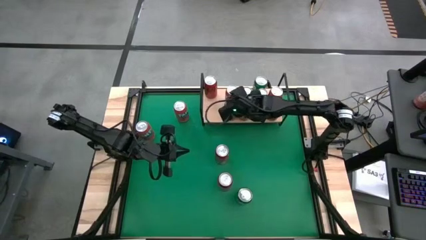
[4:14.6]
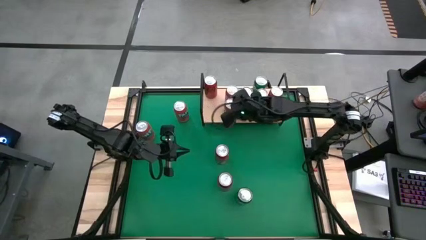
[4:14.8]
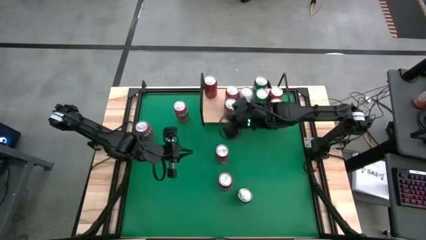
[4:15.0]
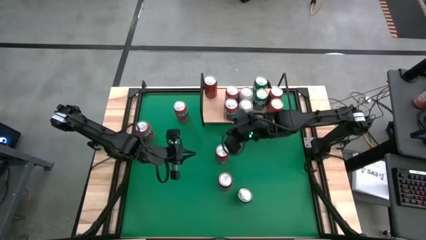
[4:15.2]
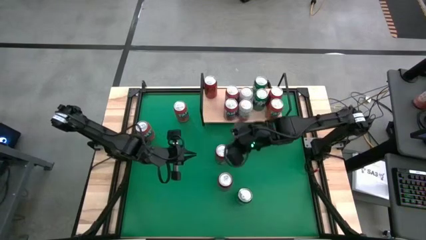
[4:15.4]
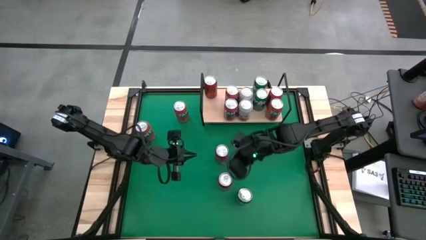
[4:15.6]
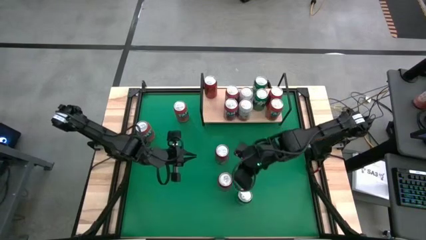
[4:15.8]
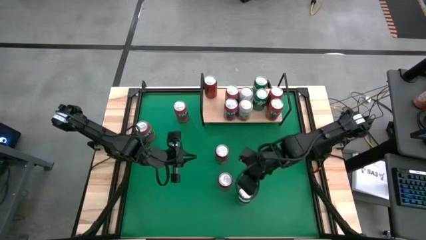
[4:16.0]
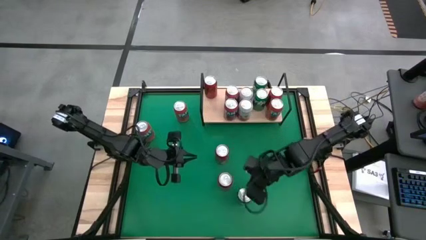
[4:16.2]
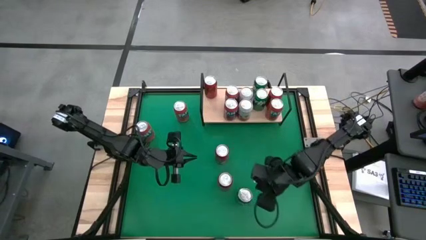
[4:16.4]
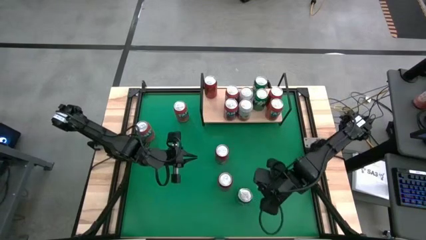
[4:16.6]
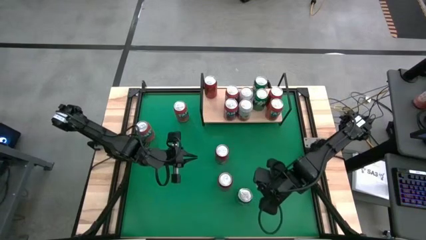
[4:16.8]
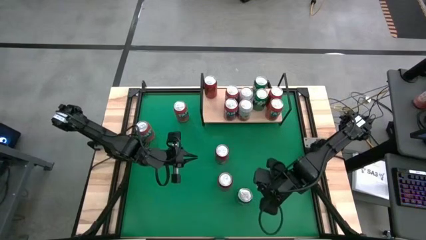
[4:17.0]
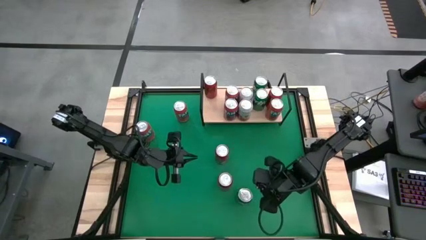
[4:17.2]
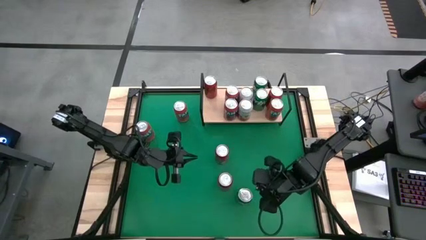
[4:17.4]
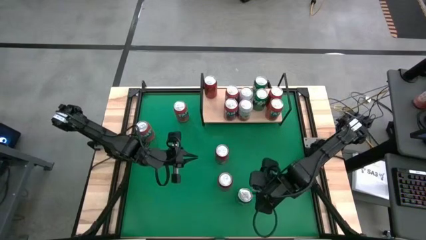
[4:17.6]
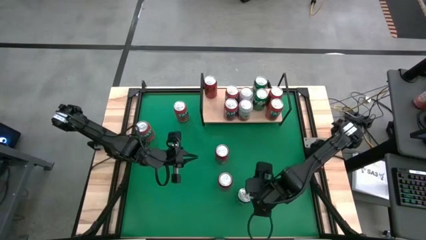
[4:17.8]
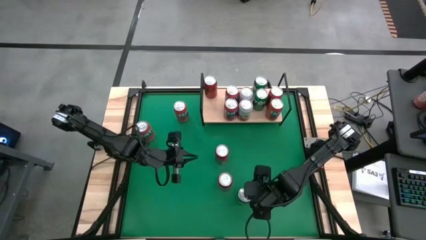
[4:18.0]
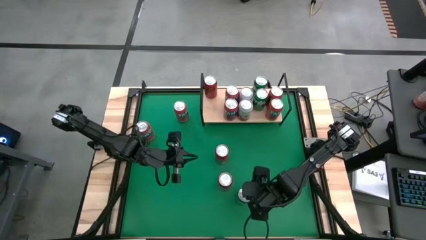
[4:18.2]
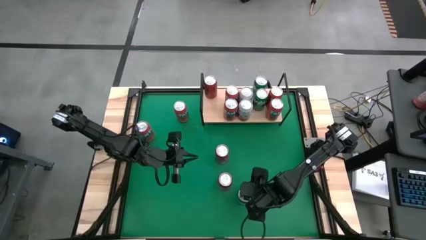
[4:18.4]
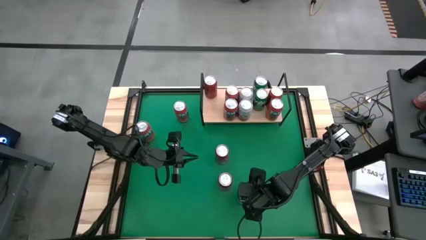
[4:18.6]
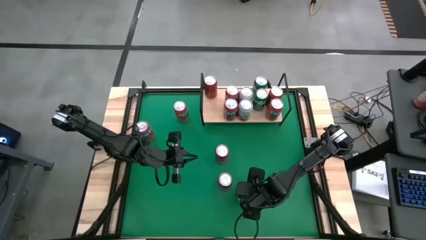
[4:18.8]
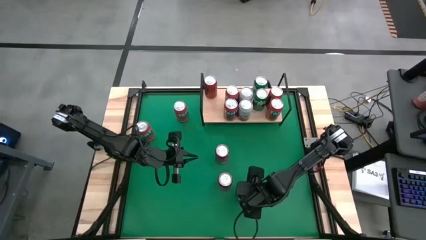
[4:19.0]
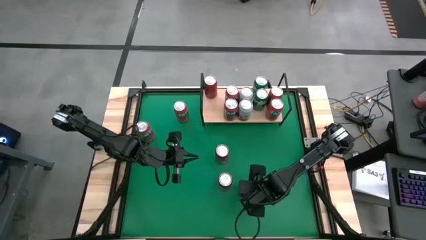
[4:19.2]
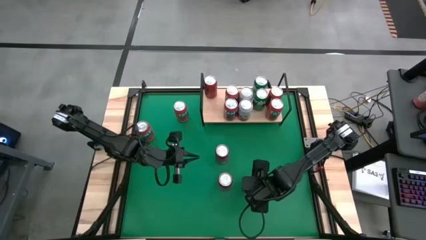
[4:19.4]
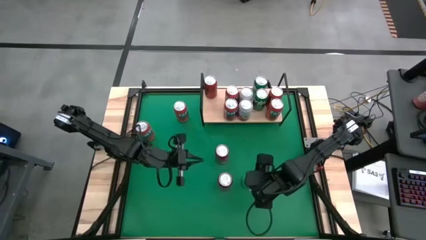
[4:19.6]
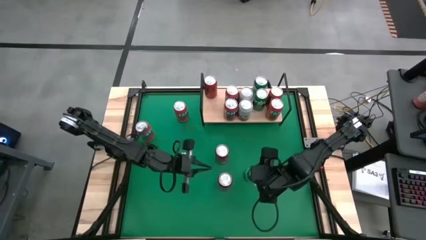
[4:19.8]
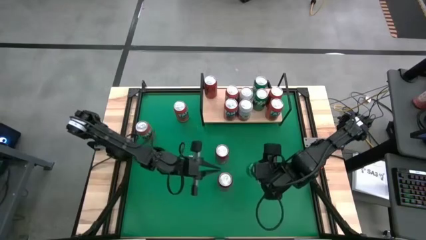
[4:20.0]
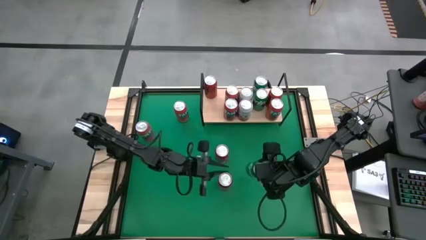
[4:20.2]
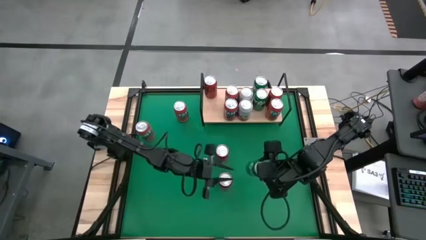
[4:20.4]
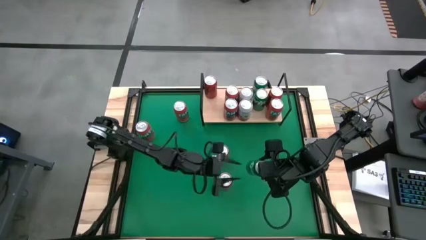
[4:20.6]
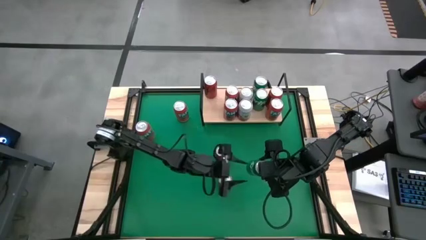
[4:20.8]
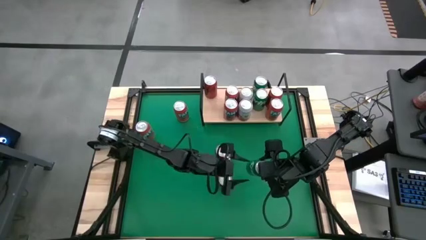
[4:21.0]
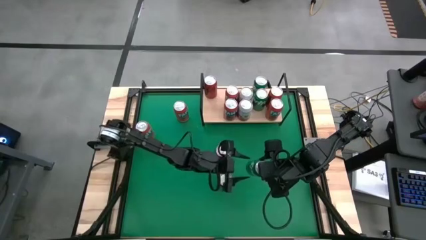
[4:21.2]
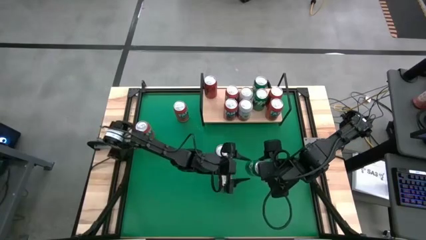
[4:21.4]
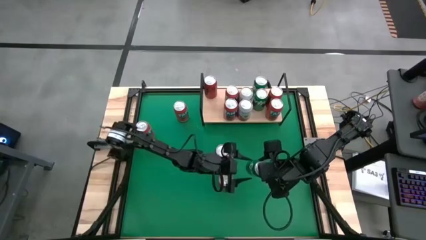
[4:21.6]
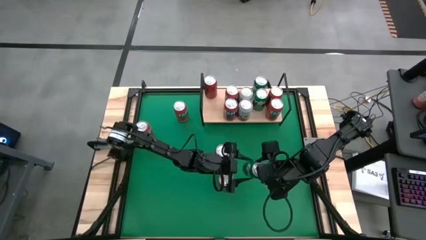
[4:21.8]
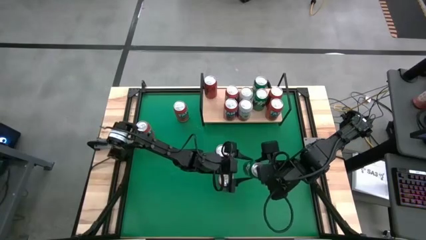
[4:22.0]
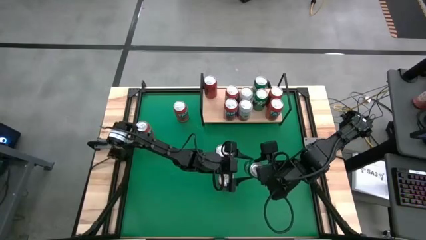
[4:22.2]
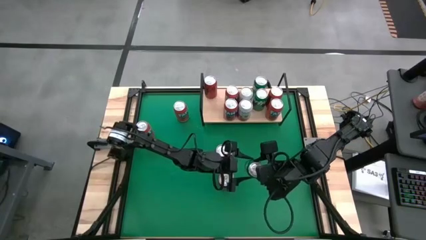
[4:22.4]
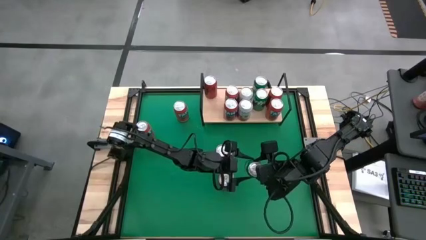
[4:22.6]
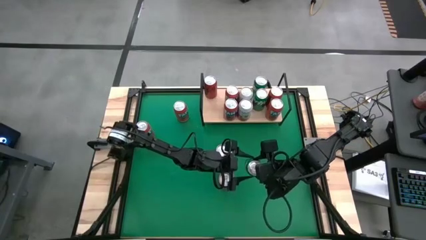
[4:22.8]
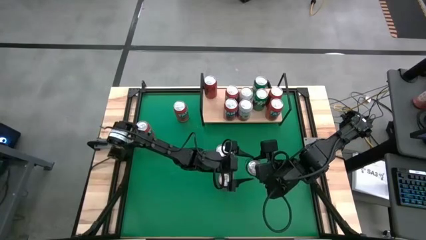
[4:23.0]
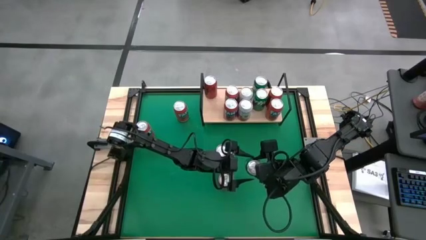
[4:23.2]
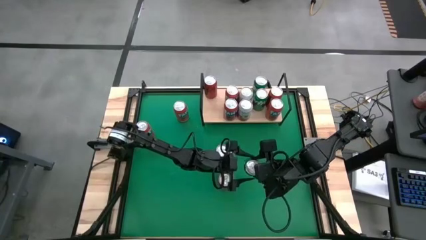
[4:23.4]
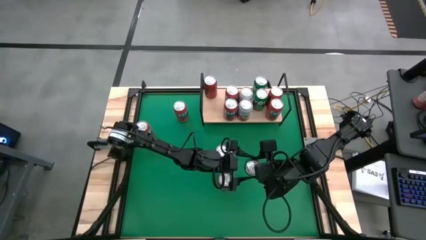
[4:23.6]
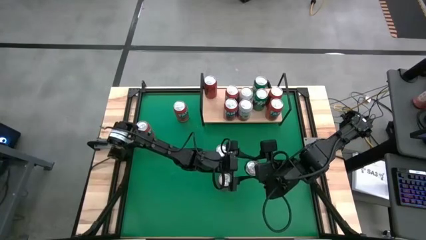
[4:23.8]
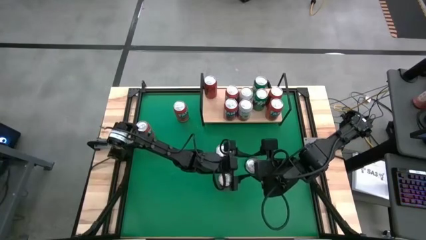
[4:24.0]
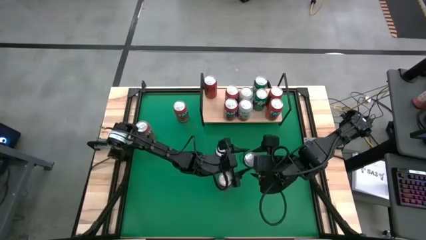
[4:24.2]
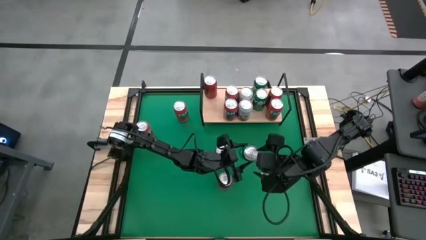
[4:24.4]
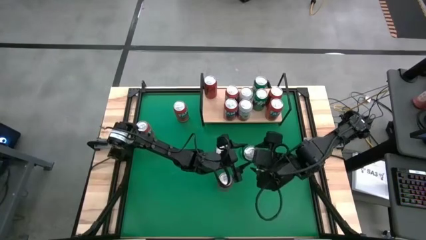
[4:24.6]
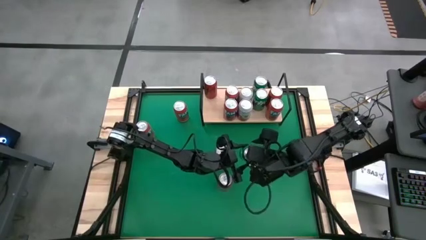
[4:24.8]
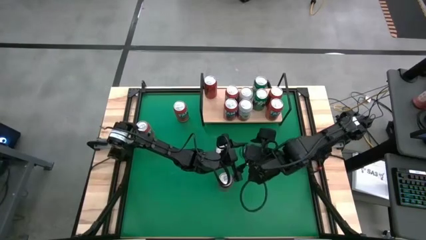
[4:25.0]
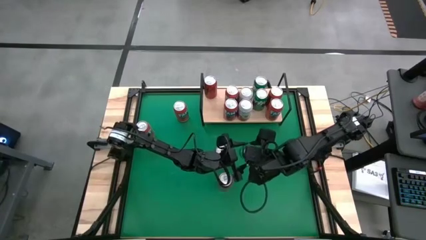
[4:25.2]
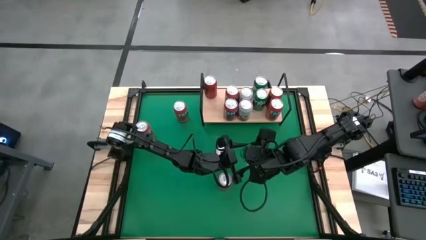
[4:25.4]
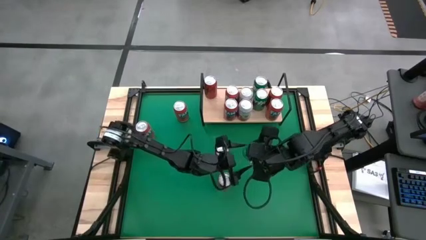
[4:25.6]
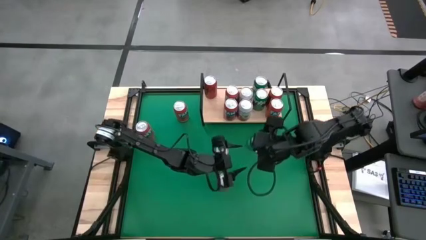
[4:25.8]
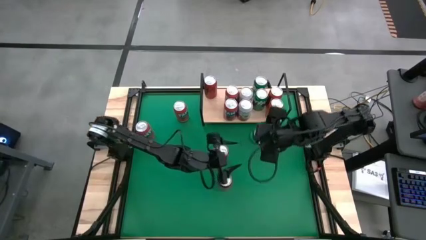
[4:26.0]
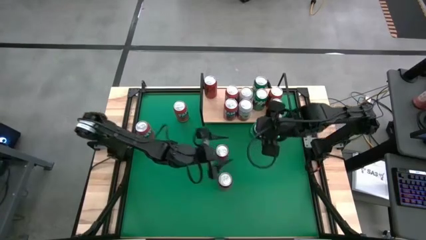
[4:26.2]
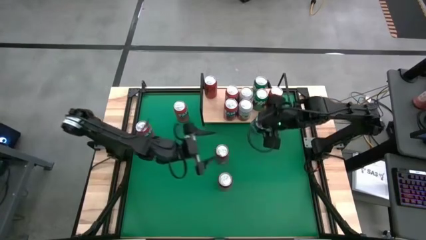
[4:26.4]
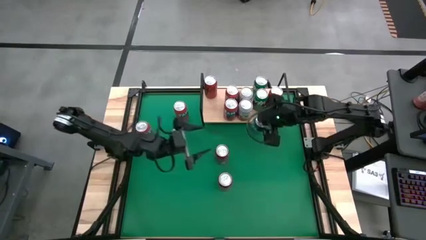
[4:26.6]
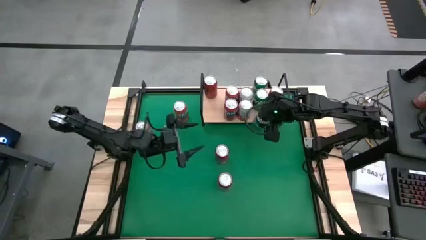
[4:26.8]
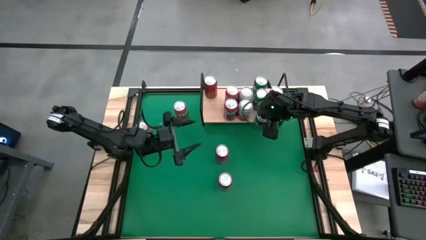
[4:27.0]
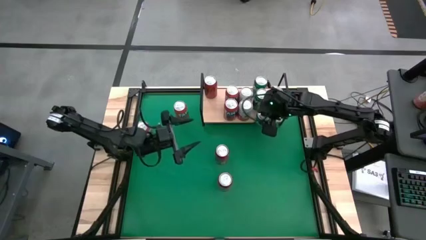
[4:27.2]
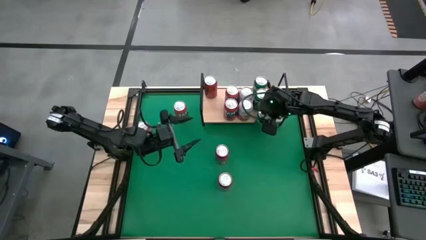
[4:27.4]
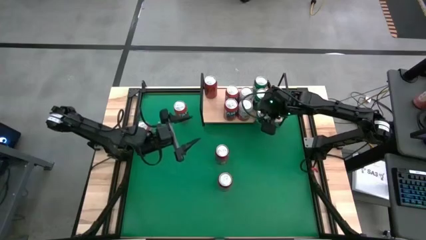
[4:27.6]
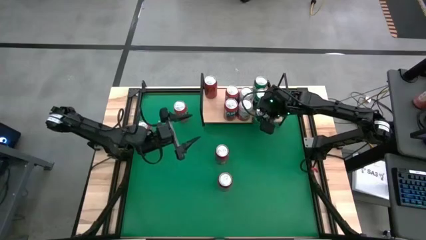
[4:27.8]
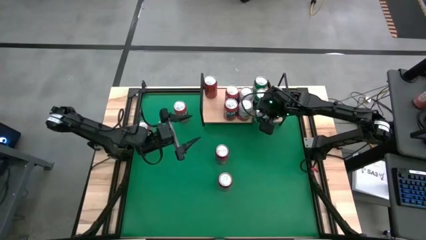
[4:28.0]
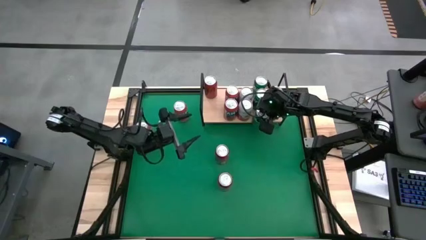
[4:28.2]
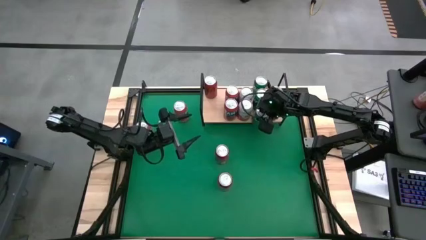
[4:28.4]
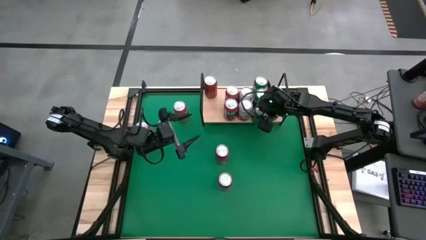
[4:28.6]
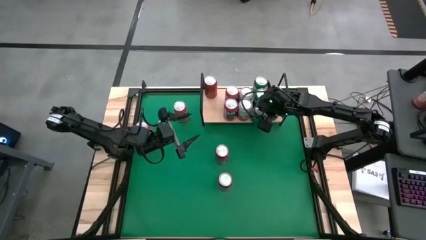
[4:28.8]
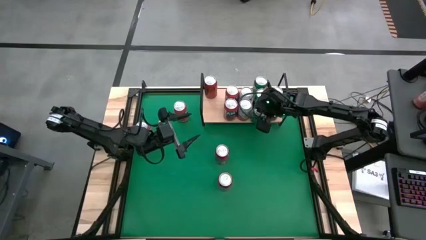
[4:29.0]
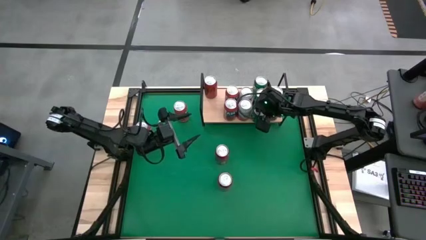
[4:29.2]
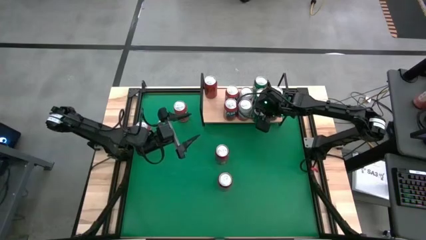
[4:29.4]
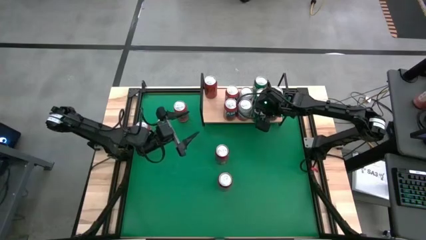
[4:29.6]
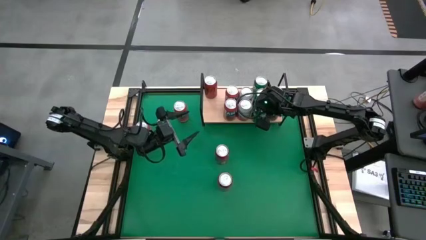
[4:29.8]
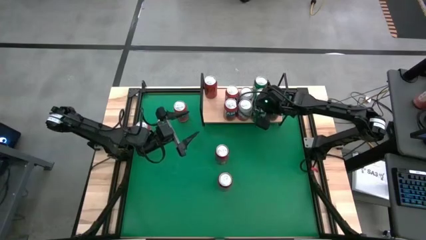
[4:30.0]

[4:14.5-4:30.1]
Task: Place canned beverage on shelf
Put the green soda can on the shelf aligned with the other green soda can
